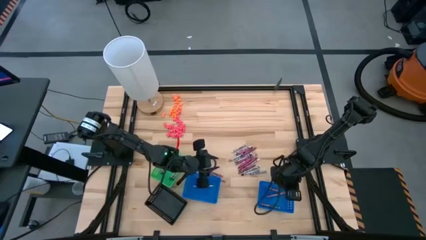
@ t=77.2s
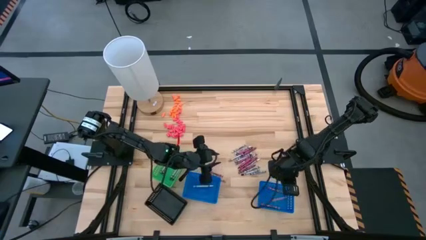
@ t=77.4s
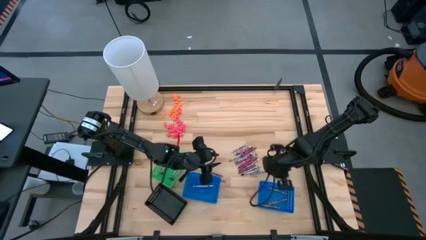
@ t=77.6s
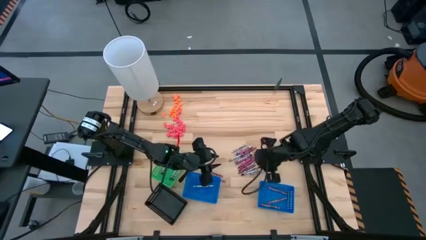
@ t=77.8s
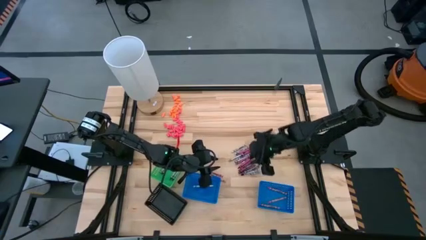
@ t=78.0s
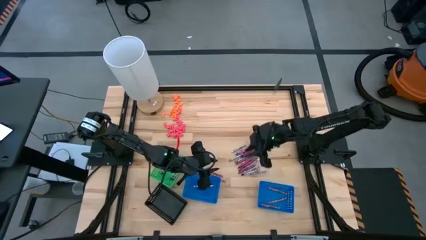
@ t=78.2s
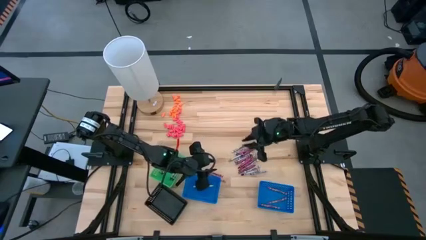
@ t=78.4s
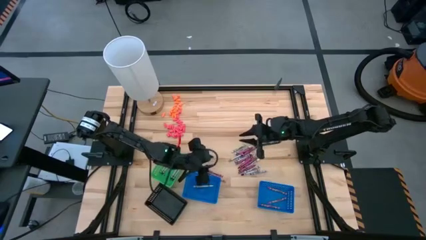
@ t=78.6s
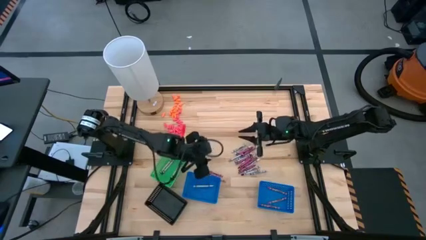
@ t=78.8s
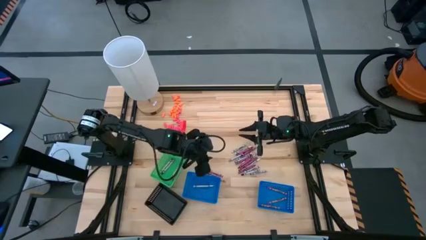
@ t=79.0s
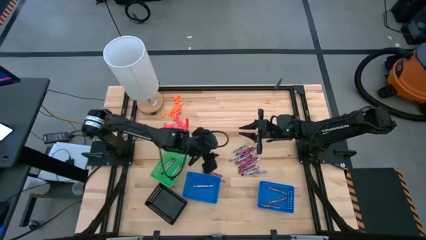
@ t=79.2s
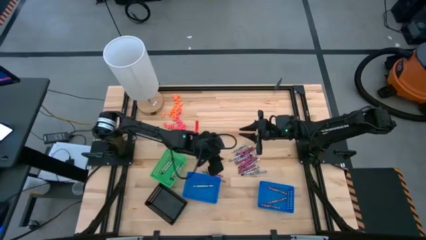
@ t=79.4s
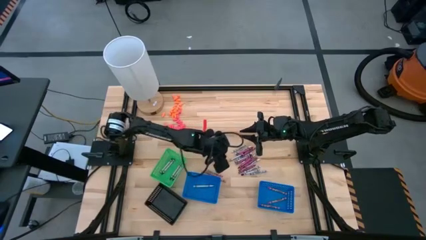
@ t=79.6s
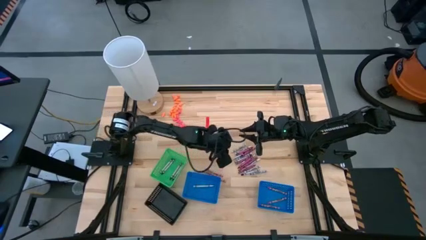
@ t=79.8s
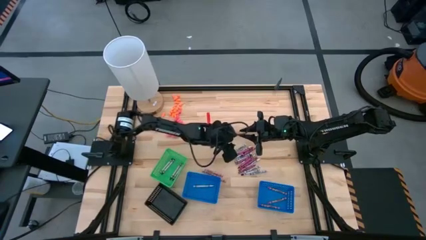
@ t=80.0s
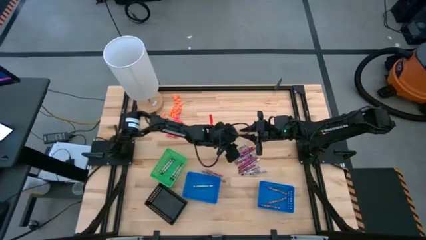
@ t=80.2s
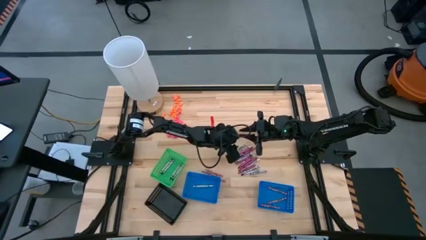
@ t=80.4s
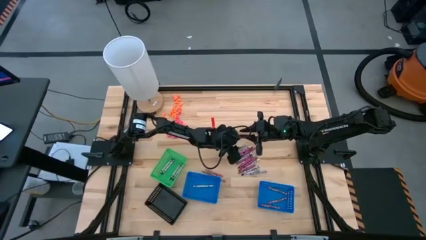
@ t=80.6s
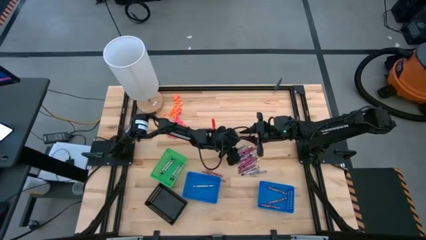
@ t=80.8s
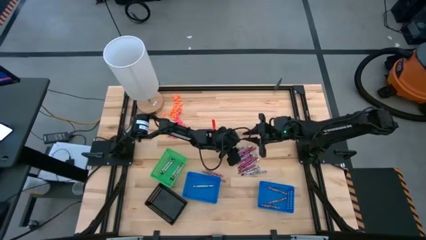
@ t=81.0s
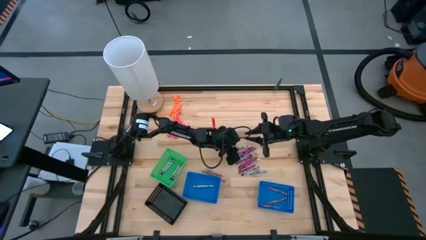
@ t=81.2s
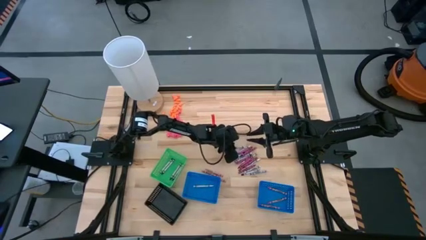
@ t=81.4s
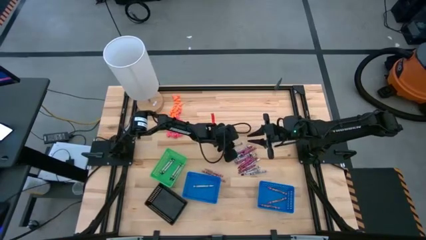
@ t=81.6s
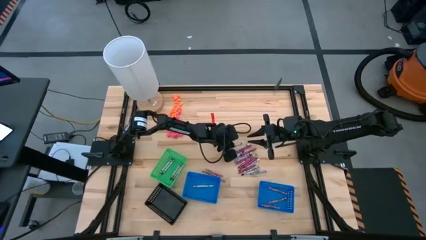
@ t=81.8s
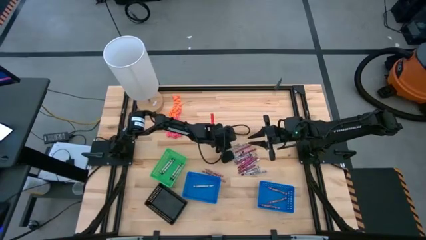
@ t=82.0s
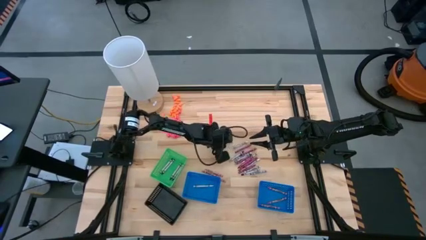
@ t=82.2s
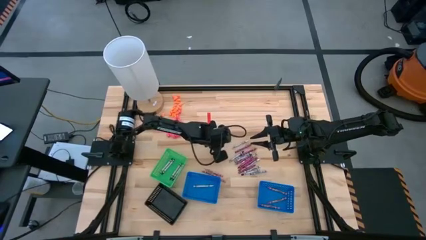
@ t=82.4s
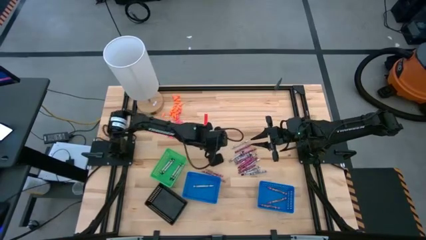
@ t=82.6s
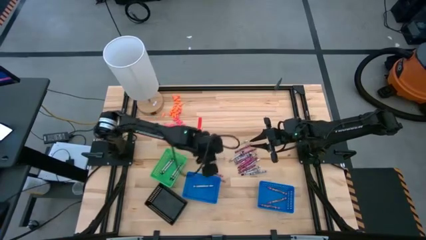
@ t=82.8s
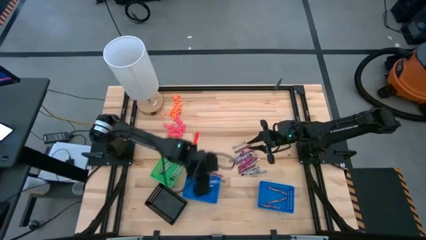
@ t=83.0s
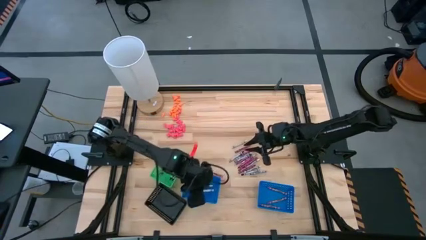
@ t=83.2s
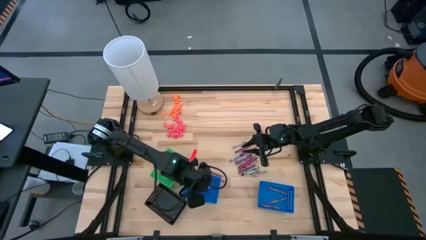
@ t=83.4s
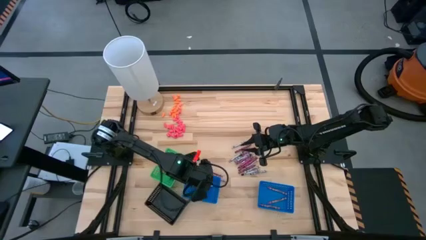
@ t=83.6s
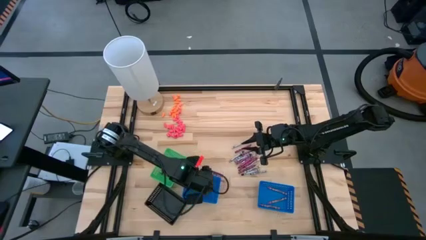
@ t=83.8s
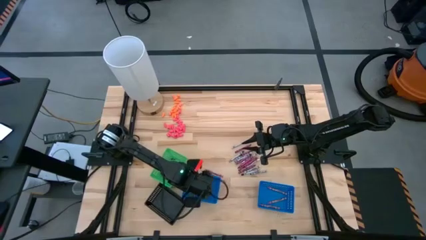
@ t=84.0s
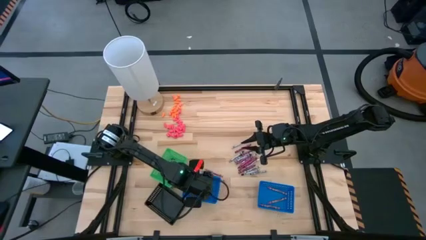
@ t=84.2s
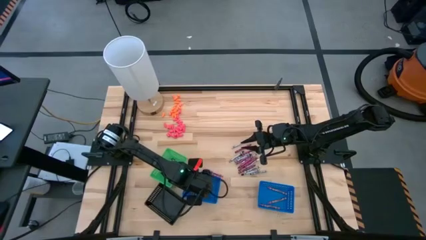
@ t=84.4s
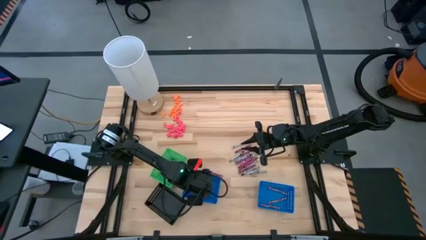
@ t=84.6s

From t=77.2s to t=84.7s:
Task: Sort crayons
Put the white crayon into the left blue basket

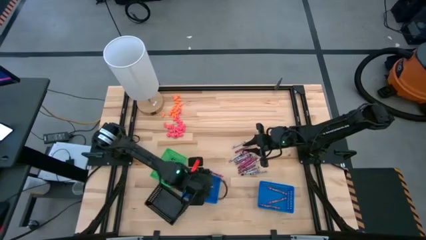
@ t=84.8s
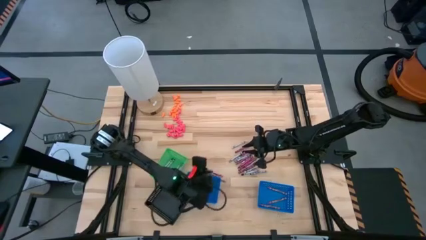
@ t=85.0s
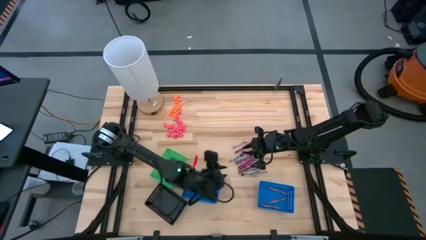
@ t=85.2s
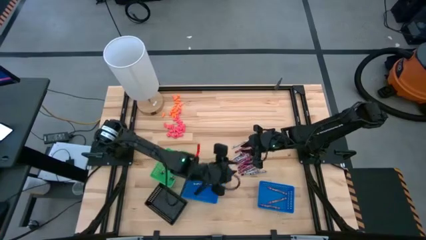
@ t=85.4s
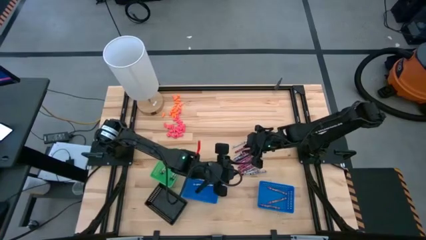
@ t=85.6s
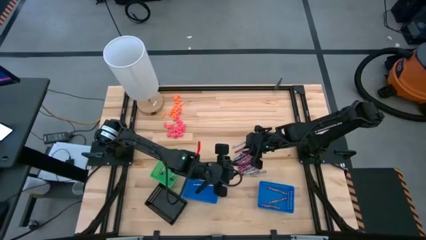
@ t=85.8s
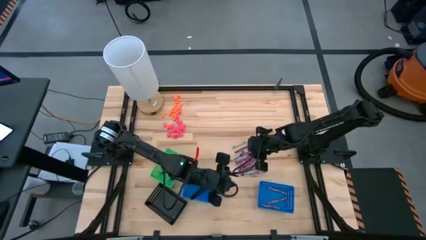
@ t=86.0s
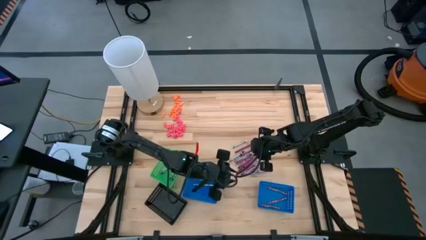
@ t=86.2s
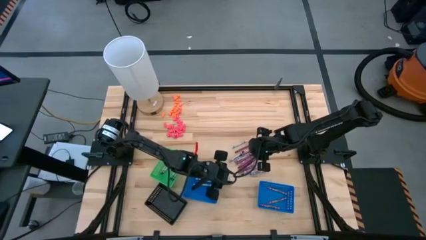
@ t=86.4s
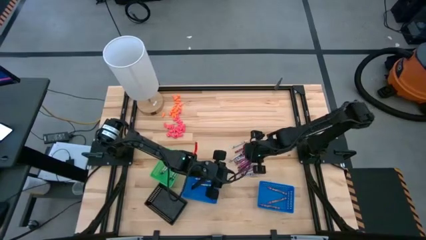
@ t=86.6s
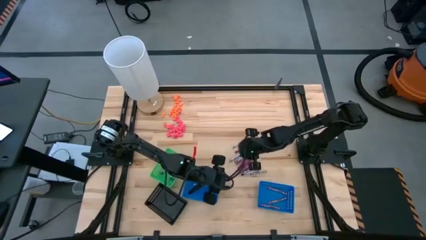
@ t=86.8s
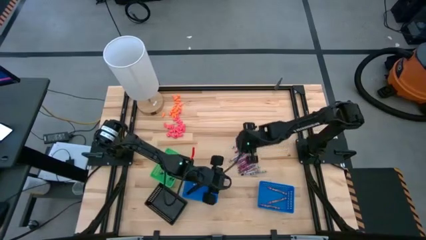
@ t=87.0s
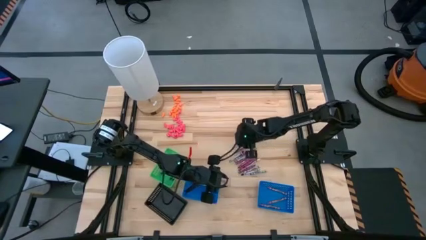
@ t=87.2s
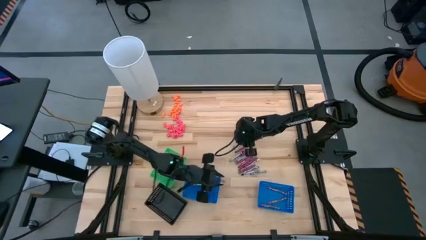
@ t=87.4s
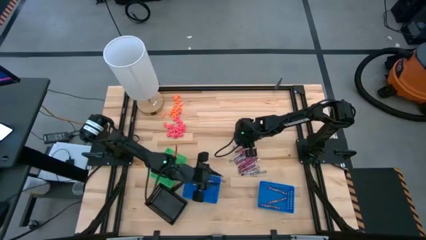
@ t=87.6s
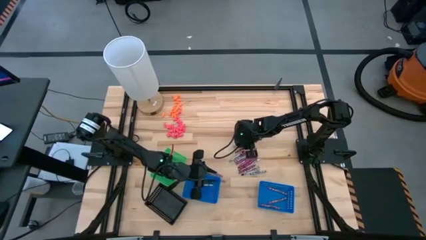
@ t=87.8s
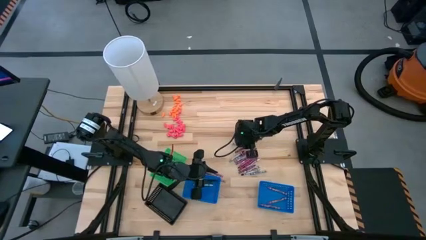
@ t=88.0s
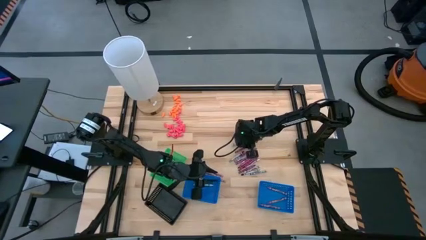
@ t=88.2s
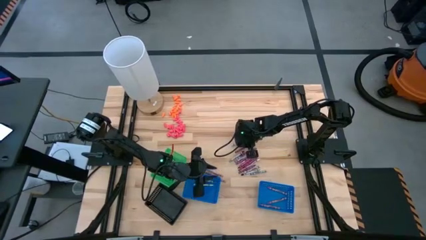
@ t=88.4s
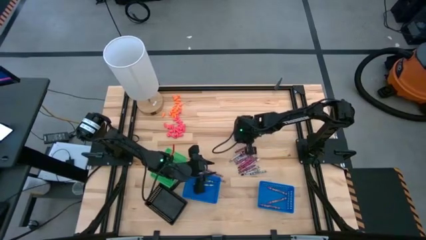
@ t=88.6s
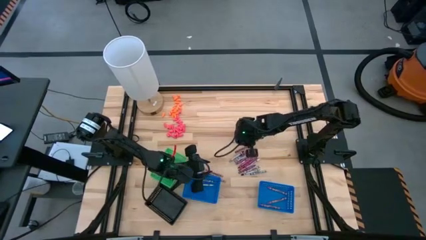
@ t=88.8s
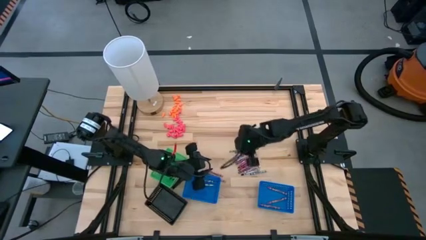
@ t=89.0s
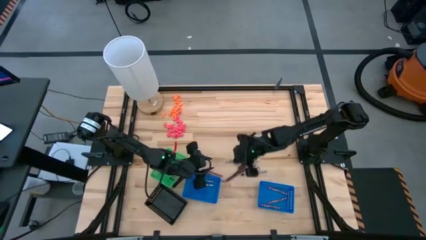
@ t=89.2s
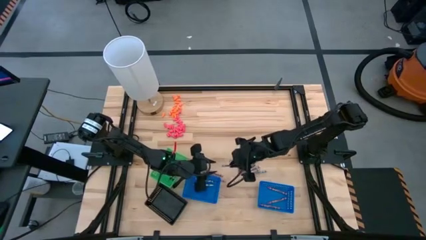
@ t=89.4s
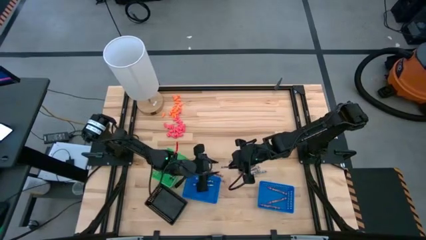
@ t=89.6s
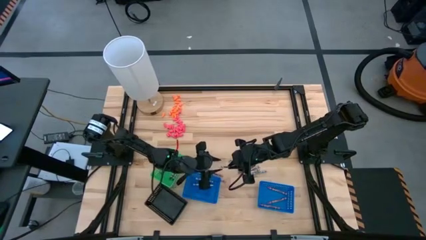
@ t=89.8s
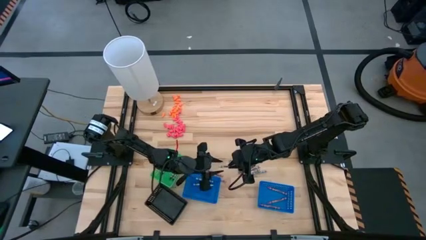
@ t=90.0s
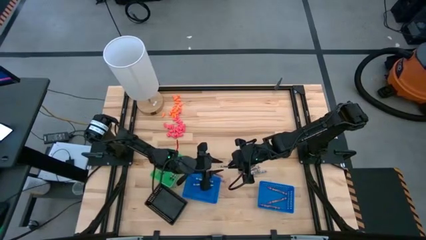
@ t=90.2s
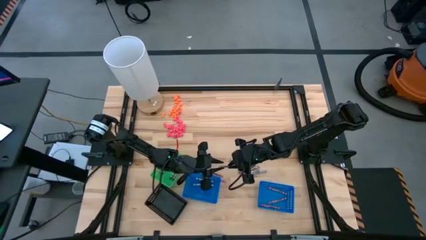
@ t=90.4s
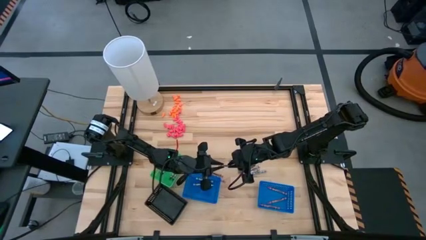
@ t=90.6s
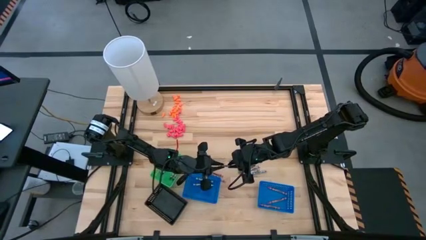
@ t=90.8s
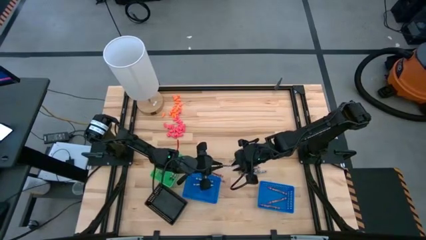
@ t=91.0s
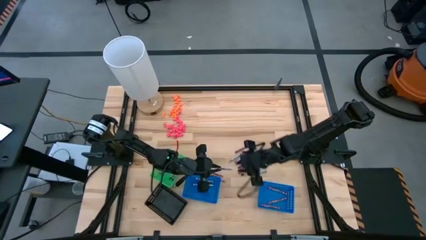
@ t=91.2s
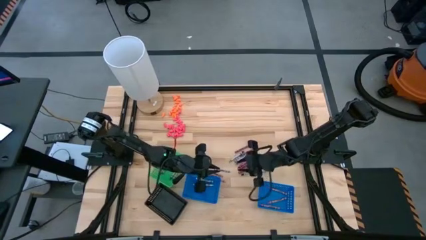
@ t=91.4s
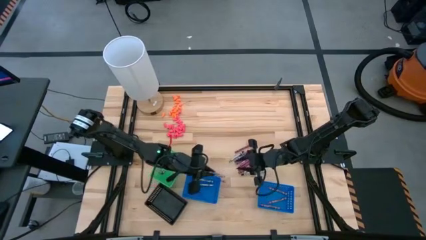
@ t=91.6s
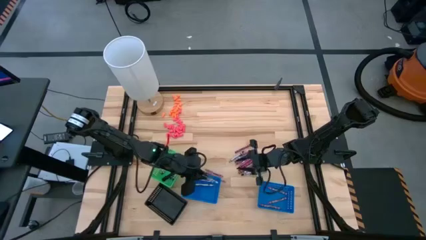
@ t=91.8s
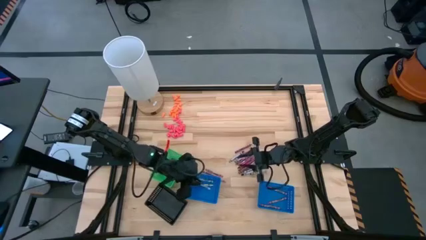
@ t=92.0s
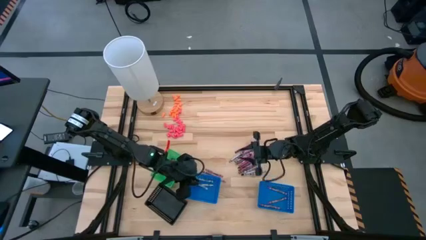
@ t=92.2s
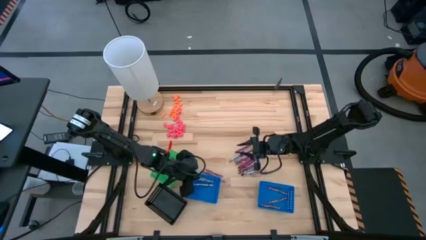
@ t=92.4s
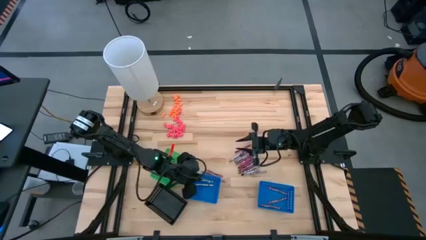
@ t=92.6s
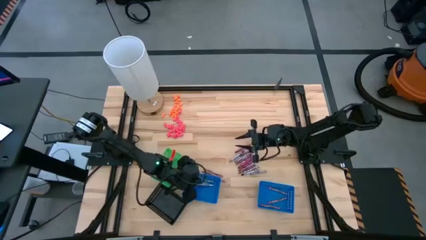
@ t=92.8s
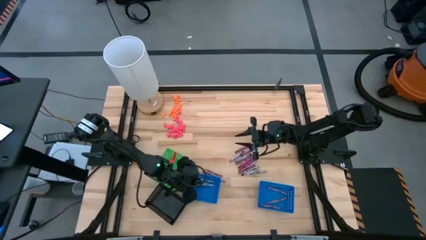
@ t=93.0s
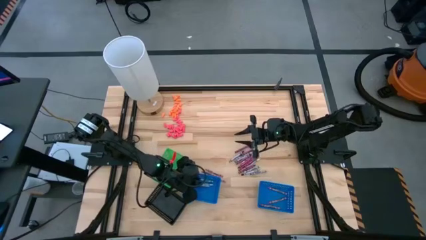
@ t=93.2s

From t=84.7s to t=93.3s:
Put the white crayon into the left blue basket
